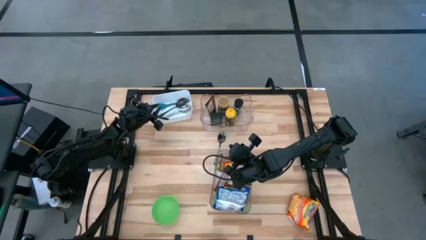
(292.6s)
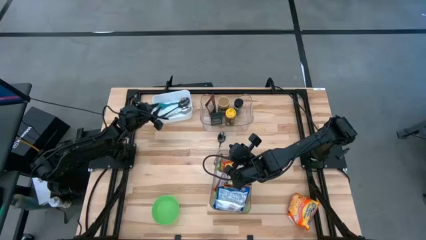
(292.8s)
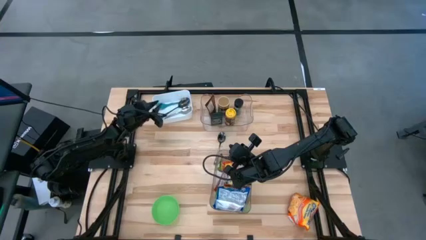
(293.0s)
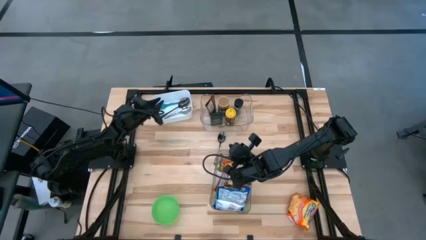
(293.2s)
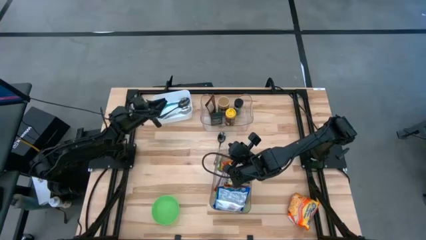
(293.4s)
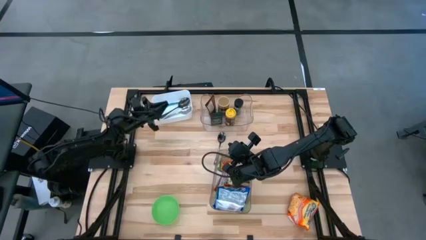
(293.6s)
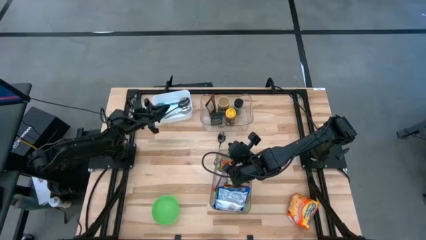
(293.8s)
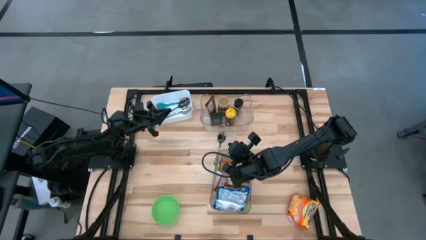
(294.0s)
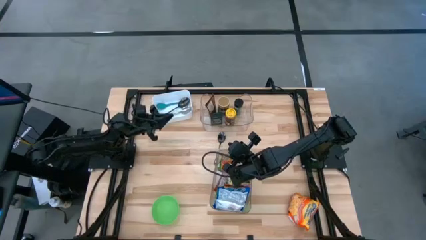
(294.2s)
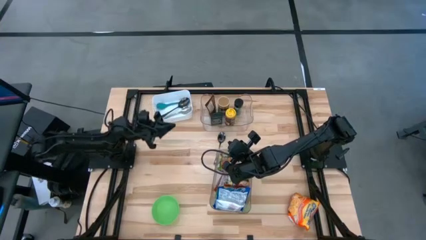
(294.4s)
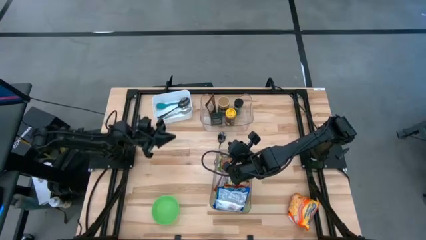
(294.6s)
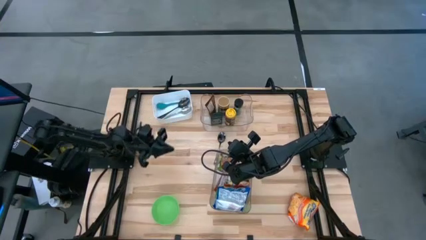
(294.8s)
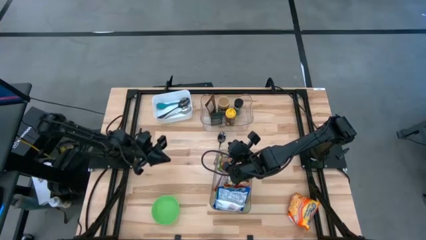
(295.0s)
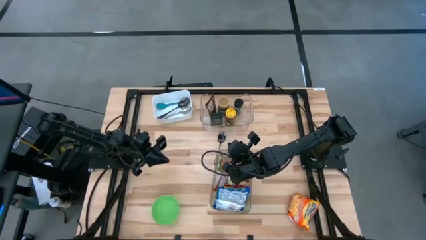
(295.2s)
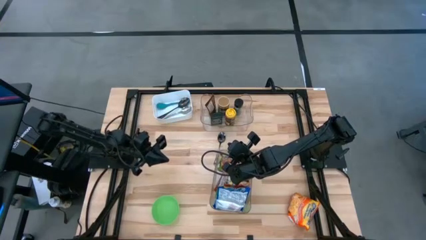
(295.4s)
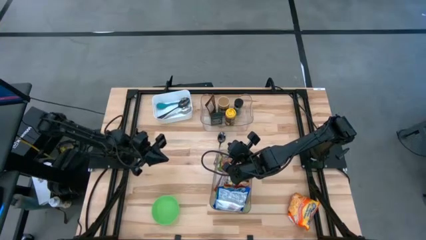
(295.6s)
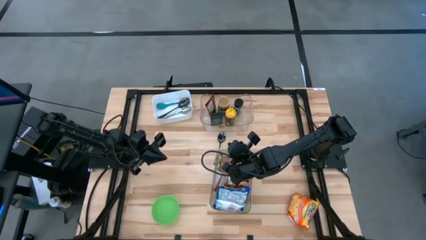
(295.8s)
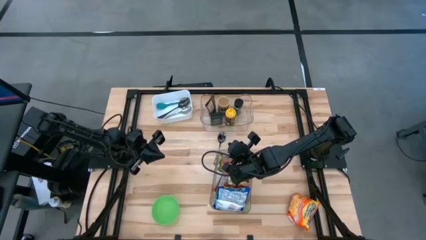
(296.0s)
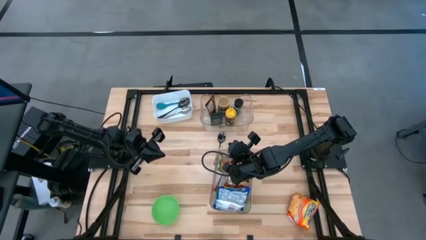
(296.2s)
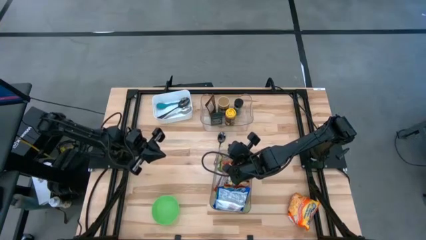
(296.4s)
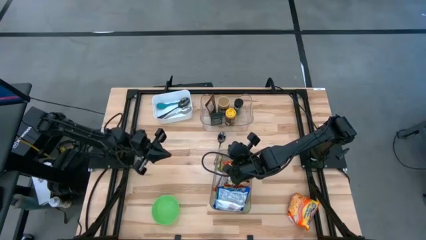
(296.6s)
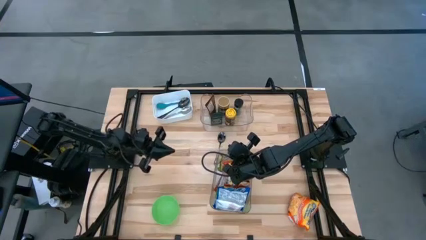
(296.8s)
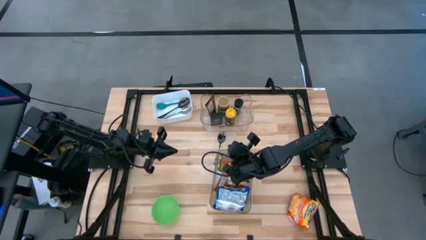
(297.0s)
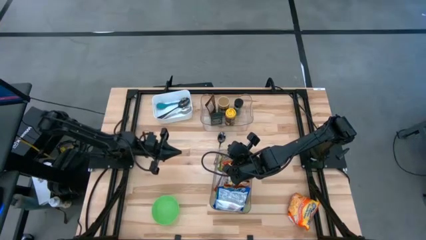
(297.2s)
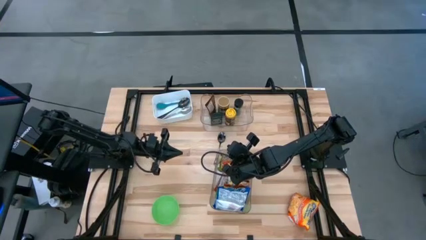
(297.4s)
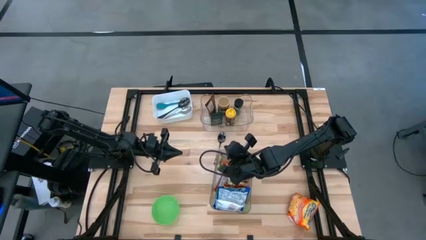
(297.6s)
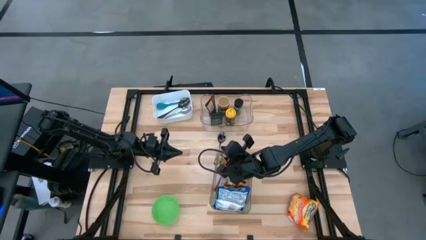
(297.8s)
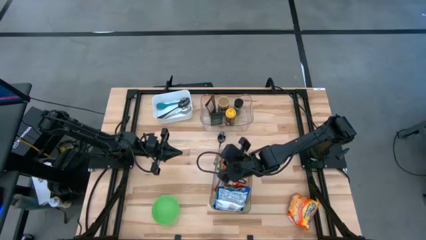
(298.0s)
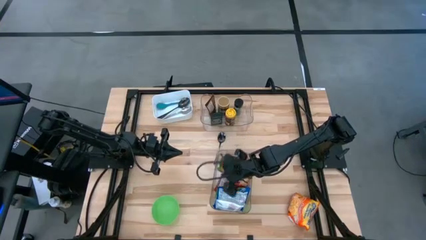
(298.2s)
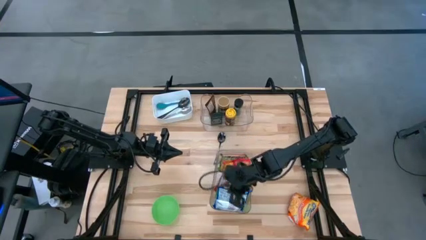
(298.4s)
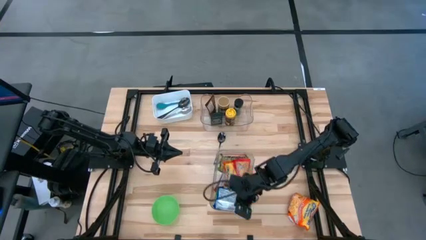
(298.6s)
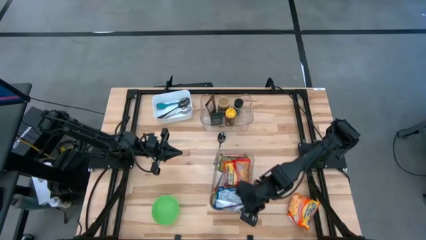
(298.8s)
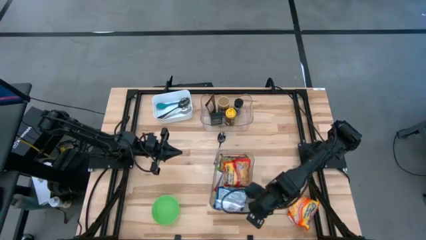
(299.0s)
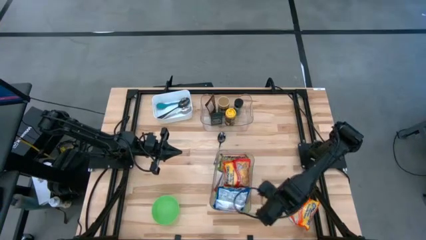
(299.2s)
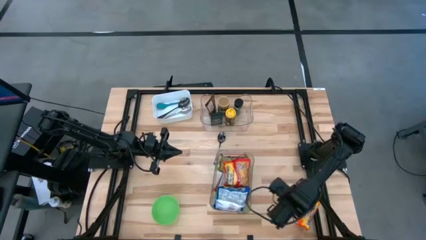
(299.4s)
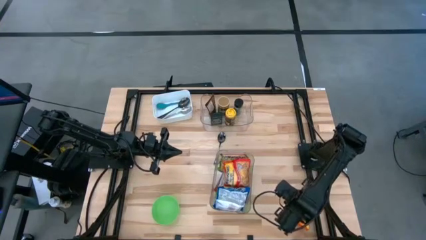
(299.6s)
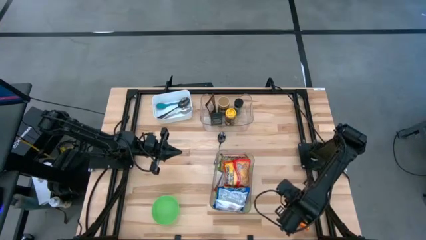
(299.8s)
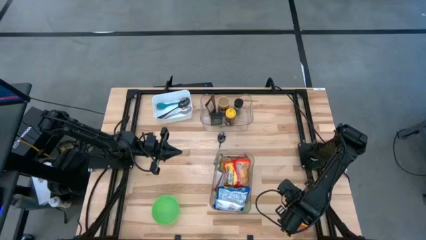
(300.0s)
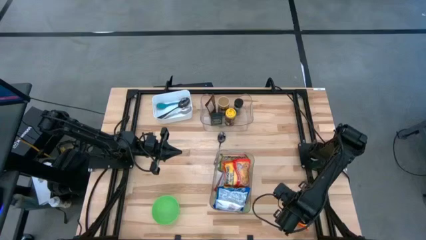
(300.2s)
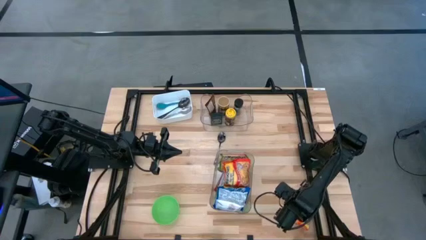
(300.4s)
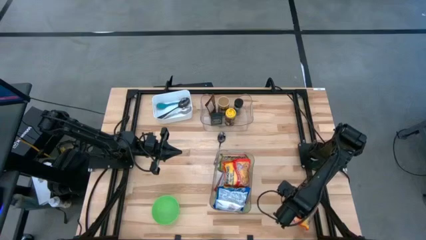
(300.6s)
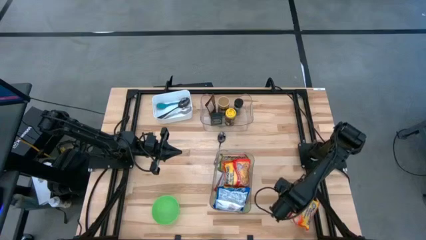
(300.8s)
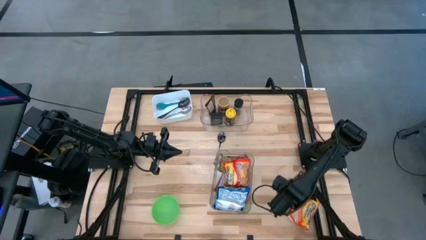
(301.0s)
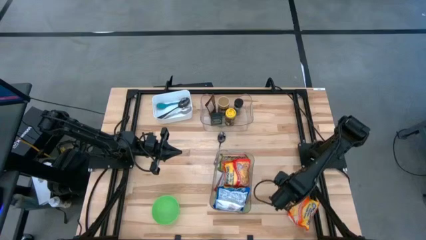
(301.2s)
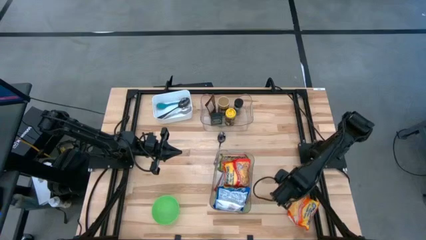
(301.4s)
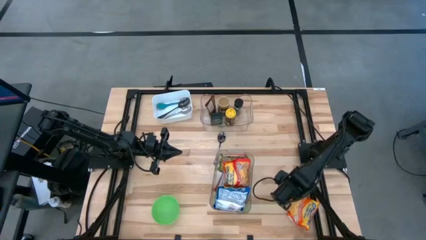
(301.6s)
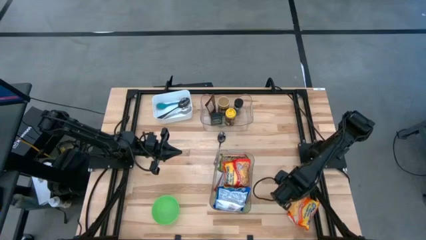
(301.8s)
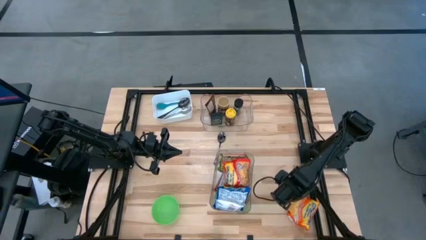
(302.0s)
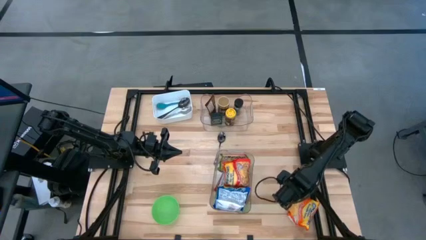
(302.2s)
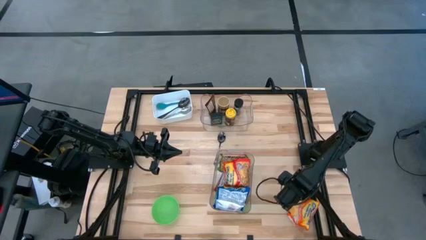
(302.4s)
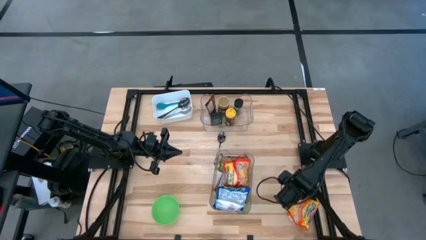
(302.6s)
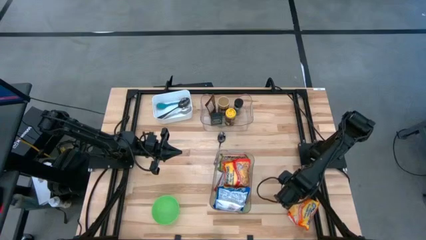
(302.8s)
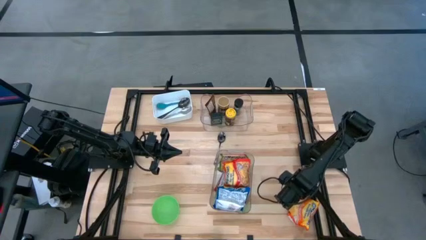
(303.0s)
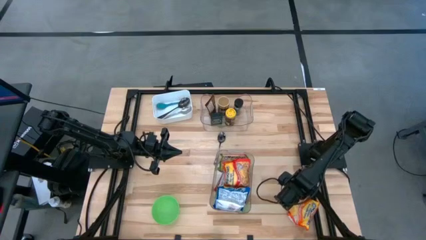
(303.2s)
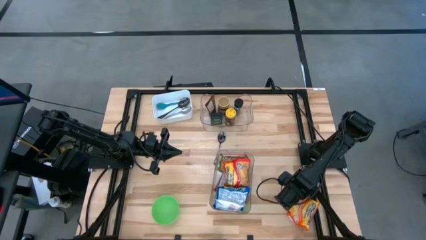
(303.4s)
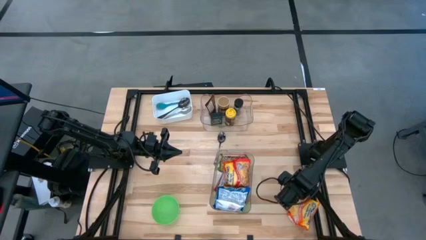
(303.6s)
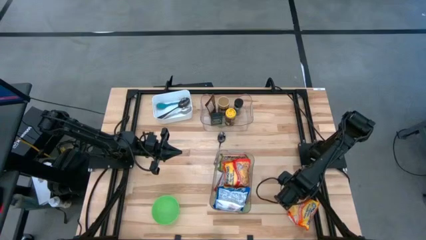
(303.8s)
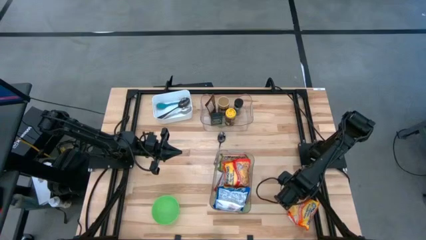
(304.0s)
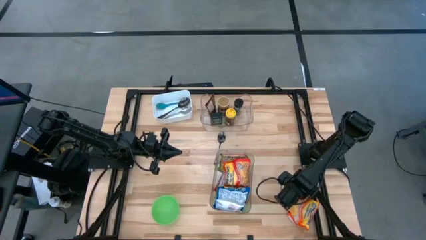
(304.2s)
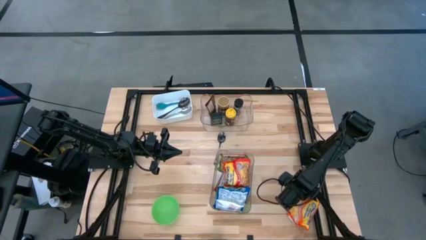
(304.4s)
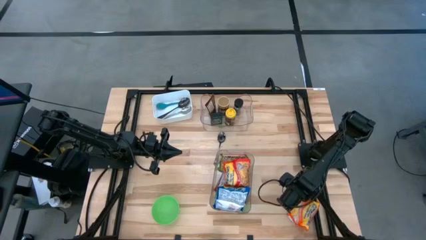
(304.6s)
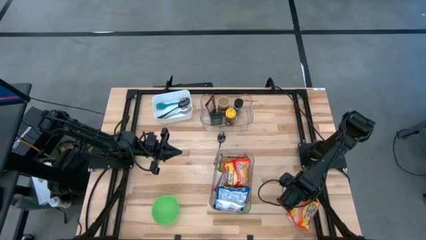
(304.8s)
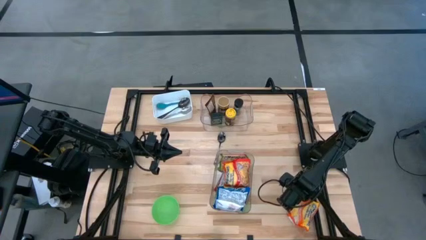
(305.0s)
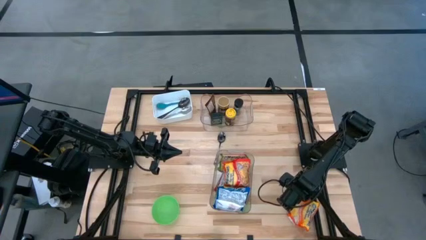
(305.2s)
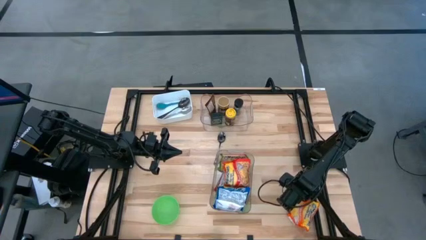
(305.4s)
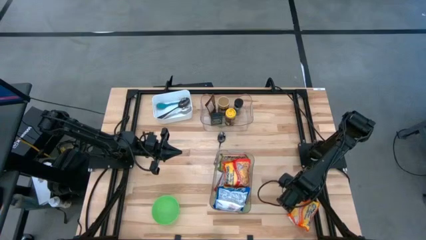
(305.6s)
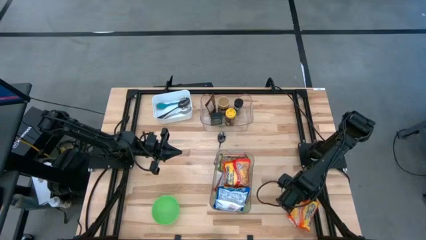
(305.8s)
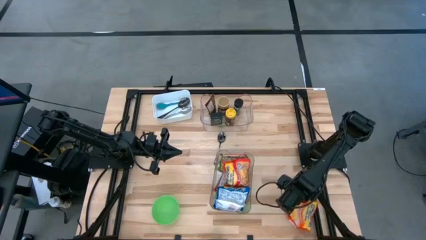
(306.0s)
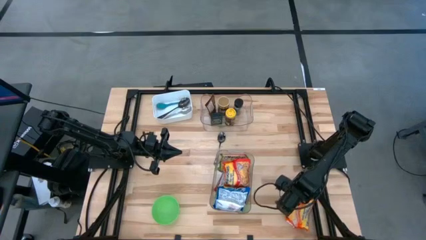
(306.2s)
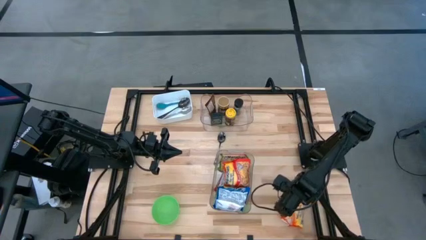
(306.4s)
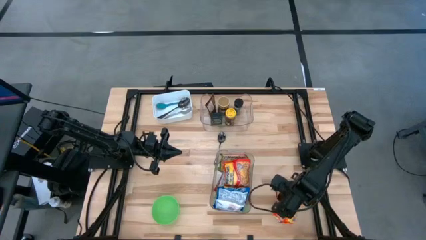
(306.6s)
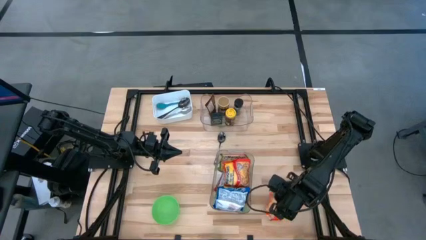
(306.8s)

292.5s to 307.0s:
Task: Pick & Place Food Item
Put the orange noodle pack into the bottom transparent bin
